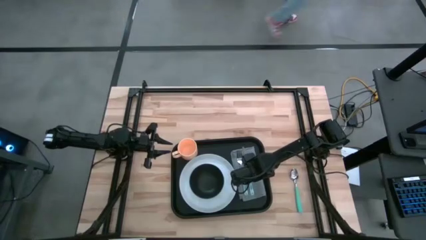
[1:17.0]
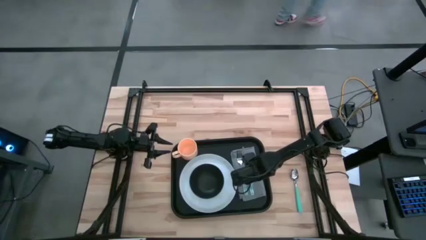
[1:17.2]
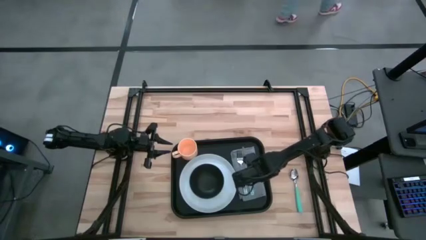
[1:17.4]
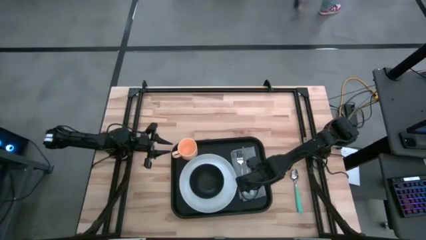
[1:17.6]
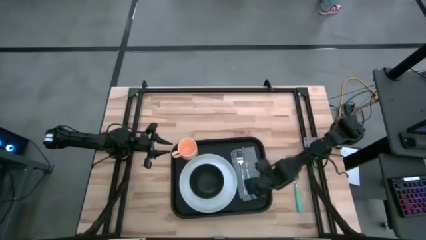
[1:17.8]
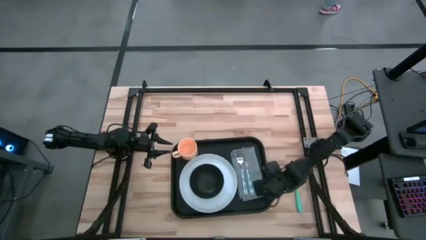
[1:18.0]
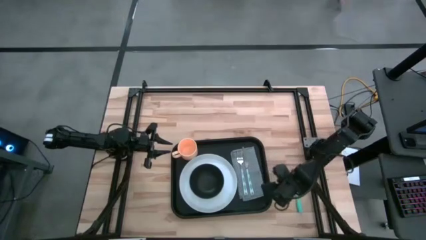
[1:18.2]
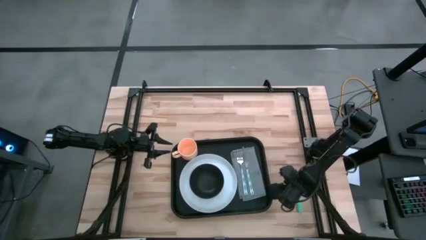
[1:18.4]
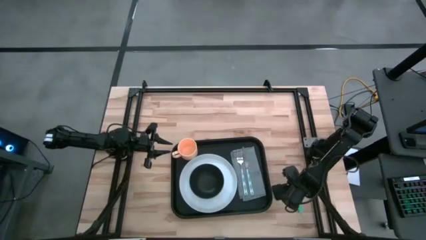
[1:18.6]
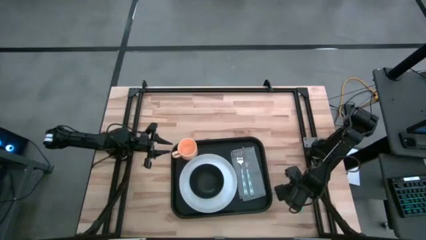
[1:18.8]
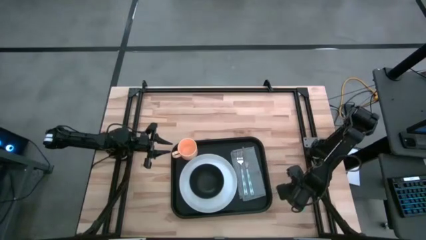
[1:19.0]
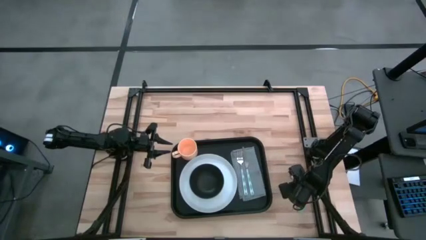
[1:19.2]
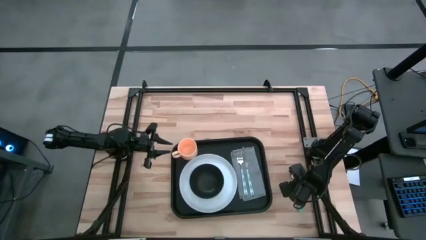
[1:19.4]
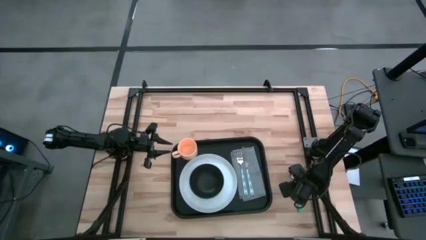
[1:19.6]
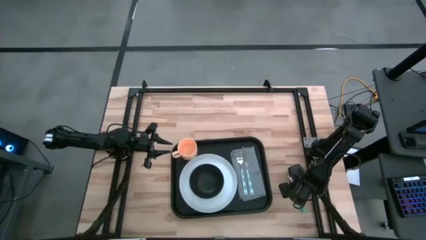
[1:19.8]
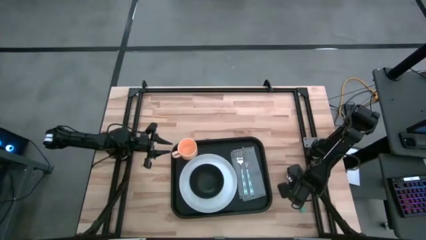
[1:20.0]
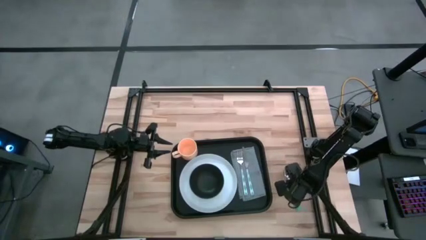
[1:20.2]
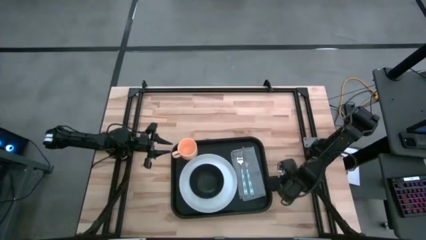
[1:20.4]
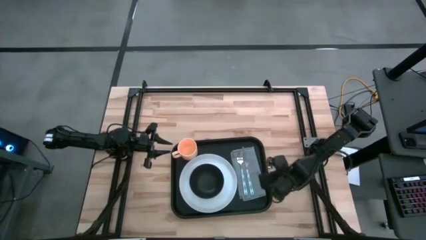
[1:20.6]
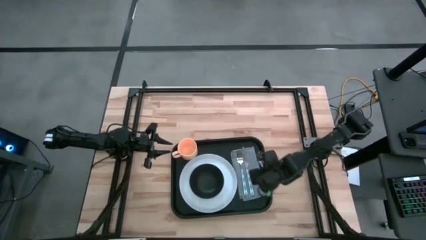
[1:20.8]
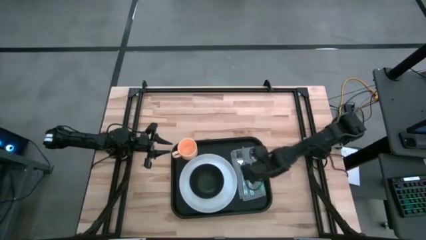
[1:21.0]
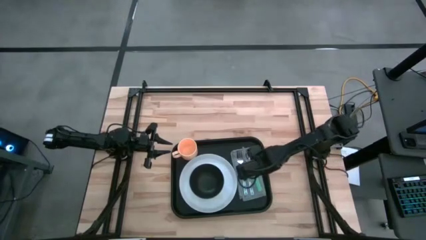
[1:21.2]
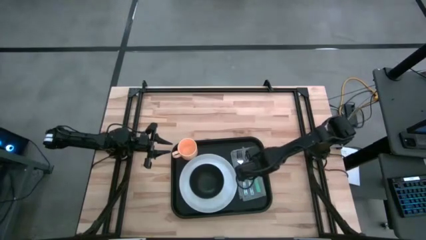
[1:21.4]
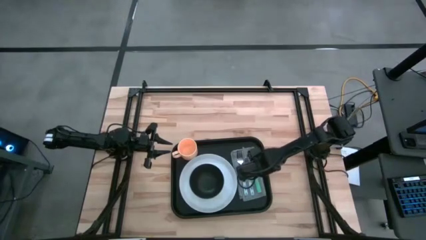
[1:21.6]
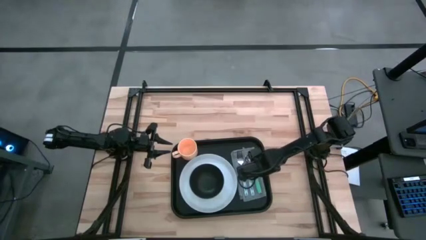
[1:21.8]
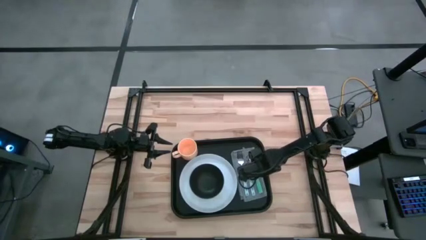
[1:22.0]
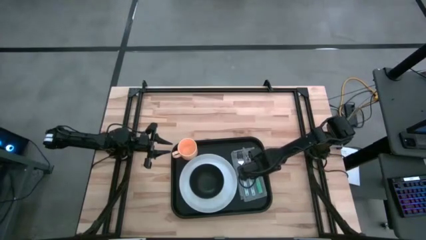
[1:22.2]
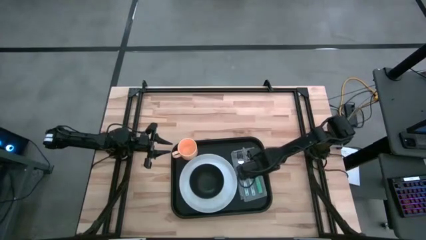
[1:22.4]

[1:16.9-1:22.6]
Task: Set up tray
Put the blue spoon on top of the gray napkin right of the blue knife

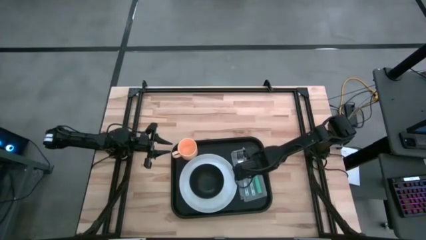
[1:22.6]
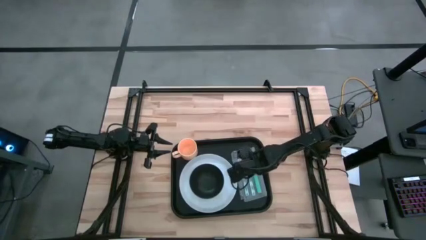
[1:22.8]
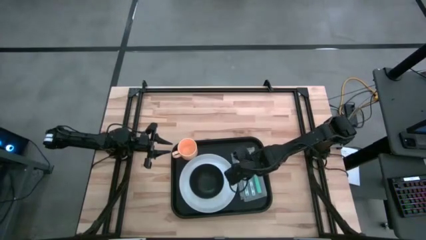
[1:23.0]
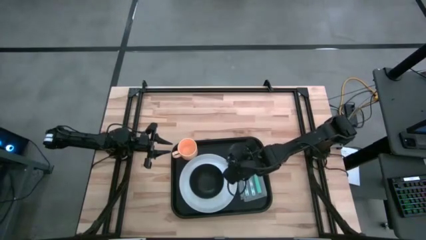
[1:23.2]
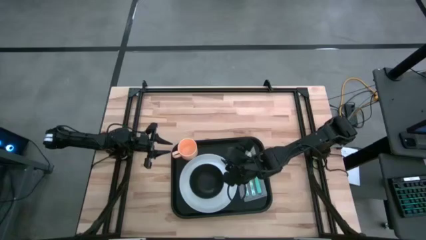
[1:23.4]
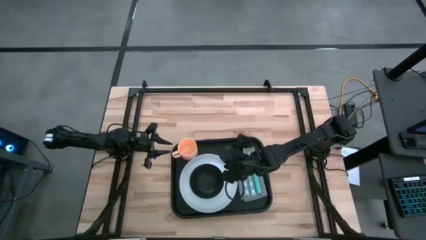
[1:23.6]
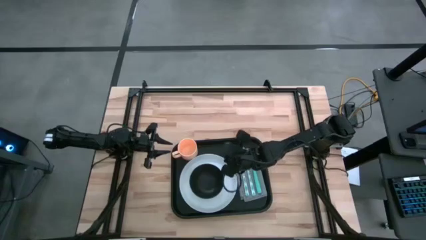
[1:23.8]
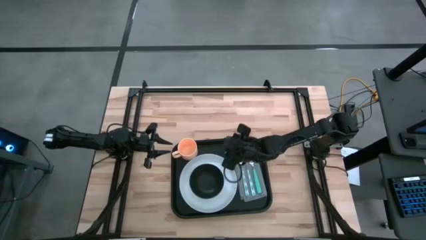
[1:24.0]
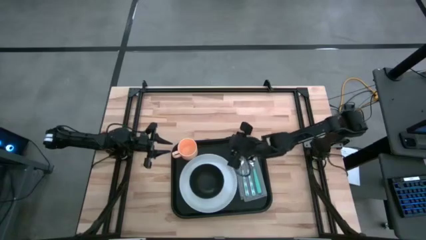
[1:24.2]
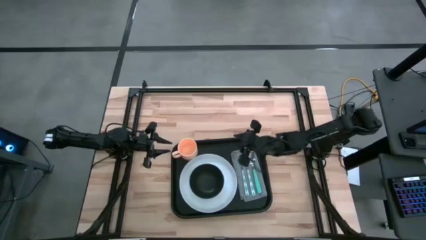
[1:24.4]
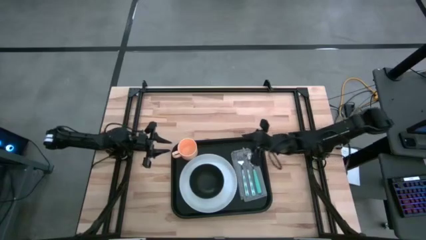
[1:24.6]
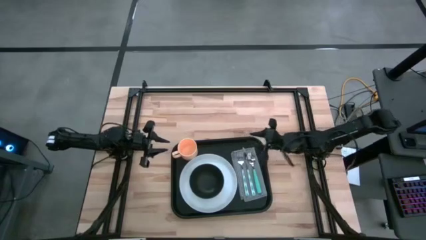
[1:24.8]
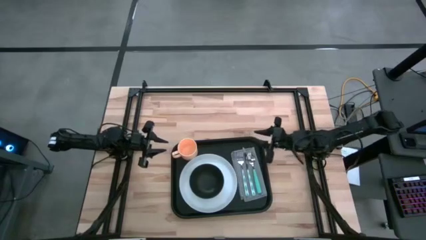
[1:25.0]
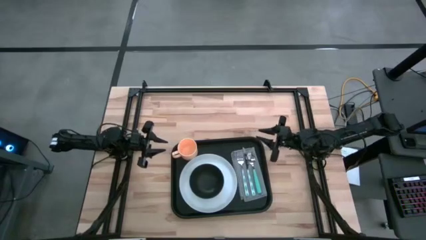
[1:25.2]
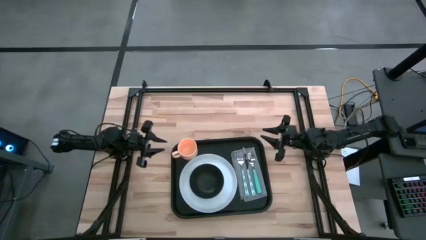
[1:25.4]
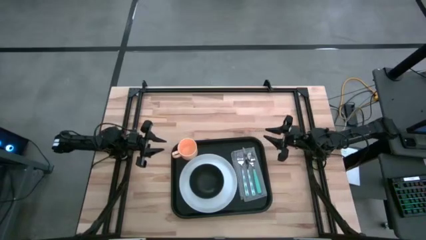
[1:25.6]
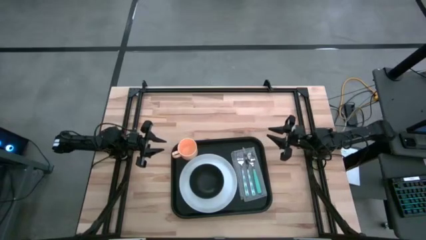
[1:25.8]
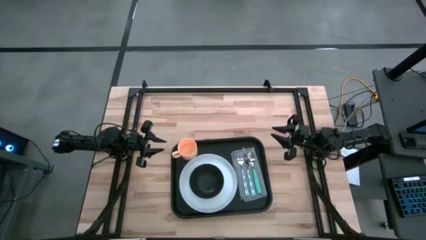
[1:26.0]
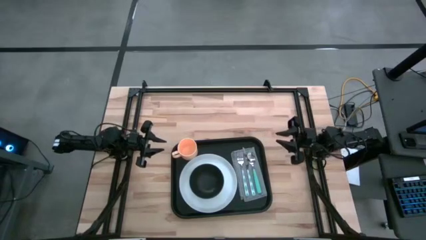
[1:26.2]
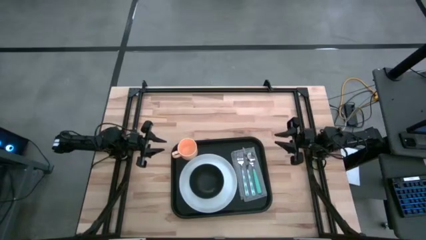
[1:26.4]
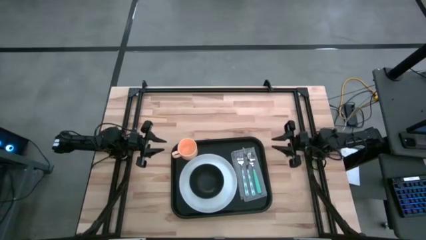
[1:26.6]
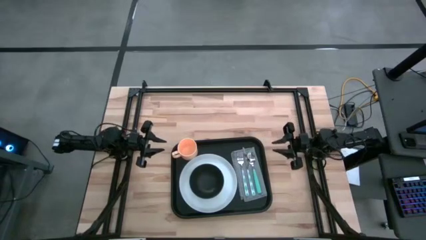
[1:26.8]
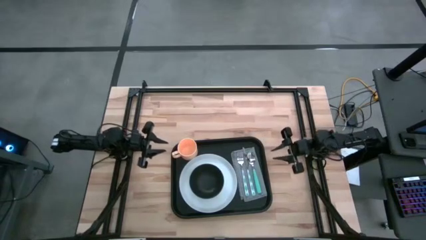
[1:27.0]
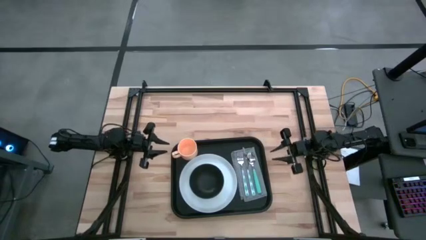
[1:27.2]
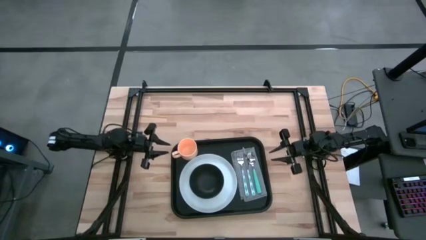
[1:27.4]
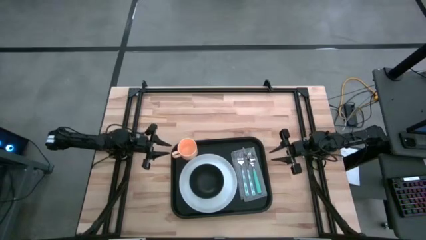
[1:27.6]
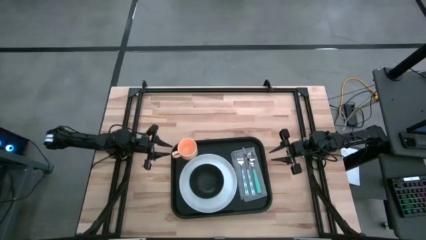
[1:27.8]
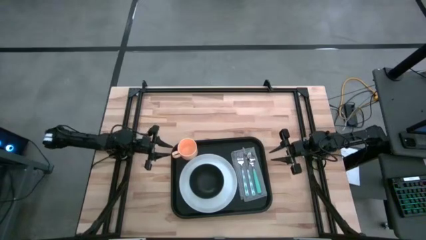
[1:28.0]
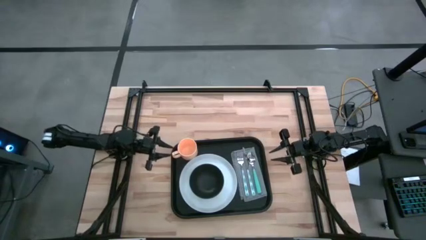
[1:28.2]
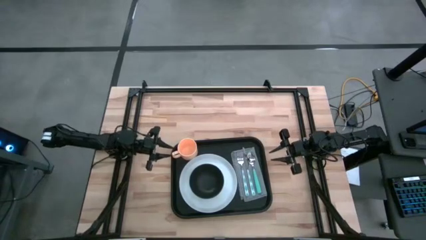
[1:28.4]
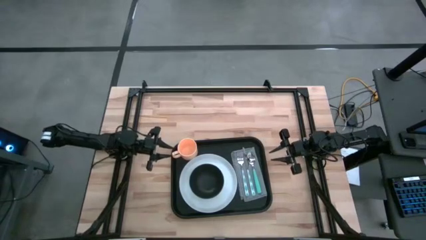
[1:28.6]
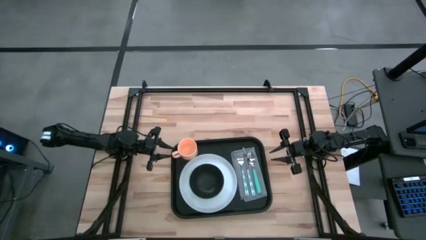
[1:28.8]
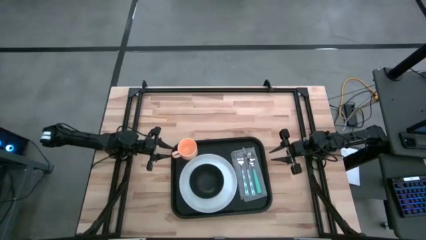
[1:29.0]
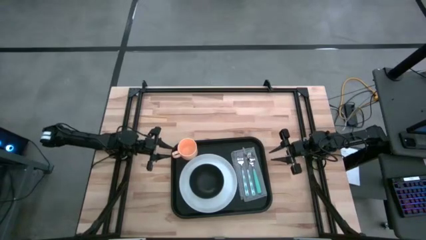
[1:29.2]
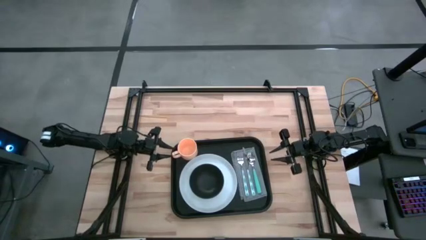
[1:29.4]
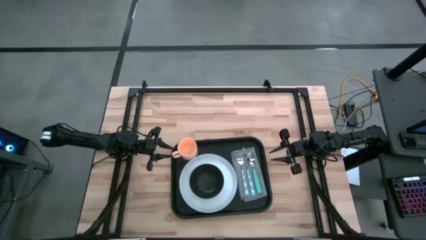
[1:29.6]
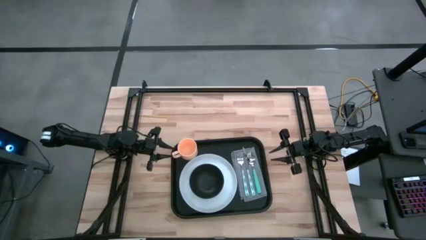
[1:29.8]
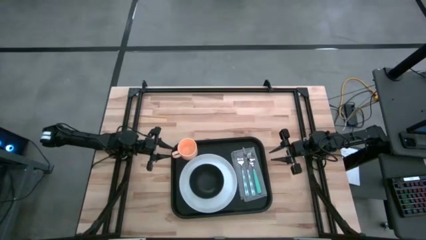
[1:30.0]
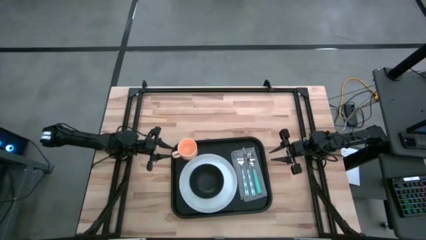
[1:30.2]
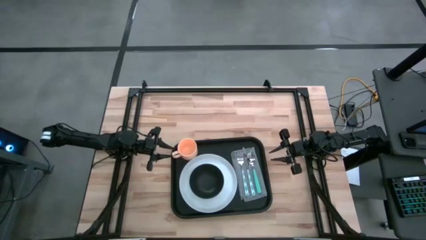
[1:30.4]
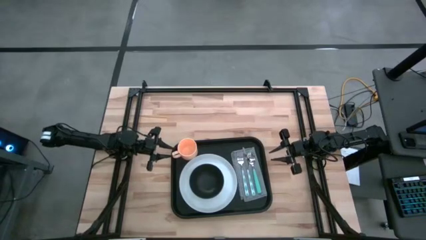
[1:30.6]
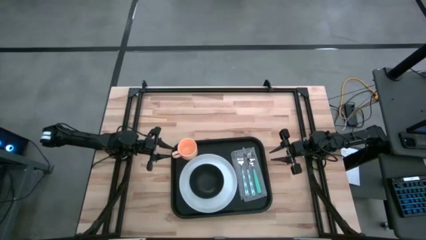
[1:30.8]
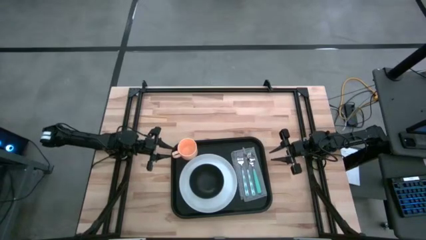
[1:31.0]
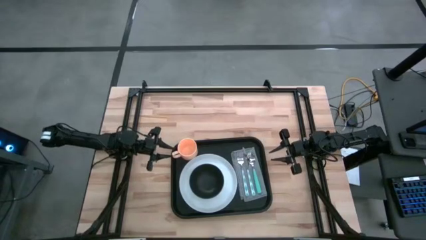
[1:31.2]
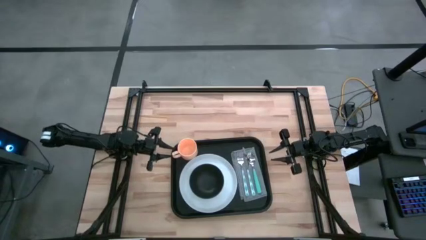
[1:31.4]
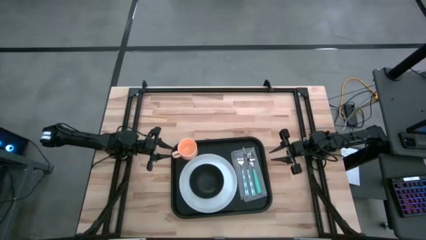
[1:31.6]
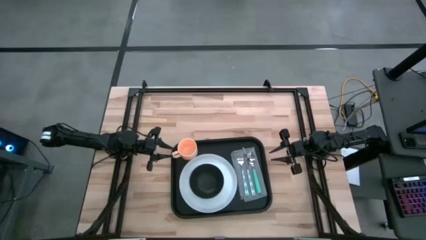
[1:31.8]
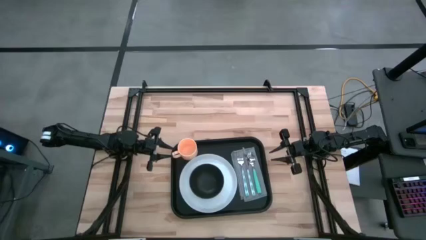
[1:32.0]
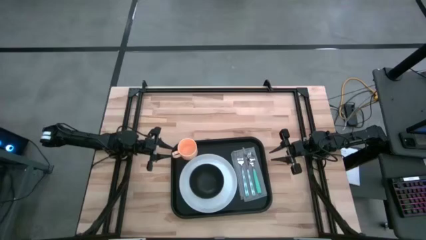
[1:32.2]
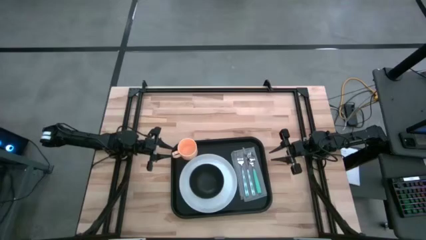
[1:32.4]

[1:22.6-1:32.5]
Return to Home Position

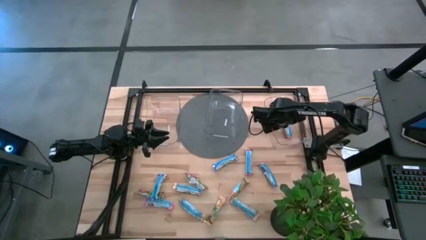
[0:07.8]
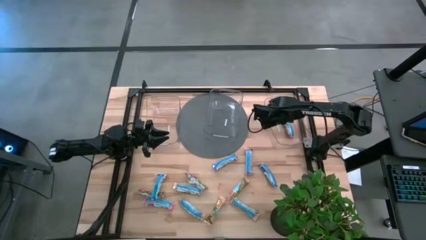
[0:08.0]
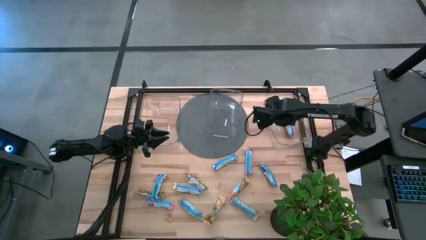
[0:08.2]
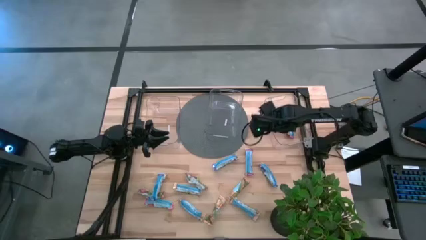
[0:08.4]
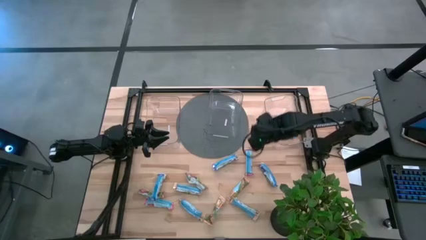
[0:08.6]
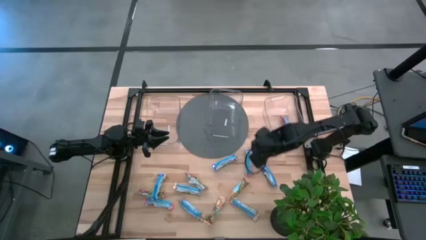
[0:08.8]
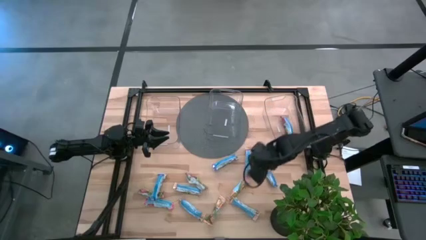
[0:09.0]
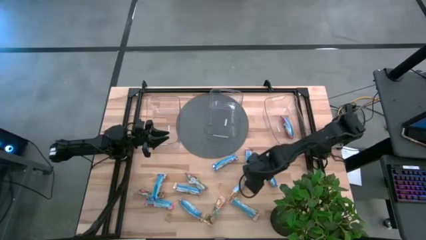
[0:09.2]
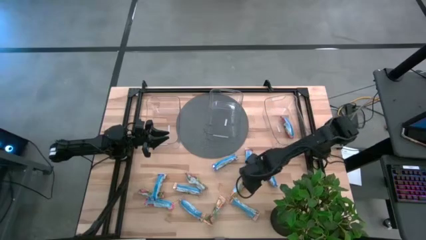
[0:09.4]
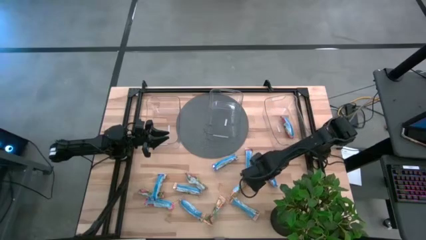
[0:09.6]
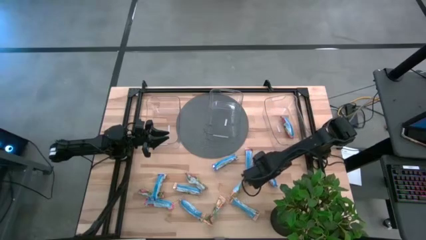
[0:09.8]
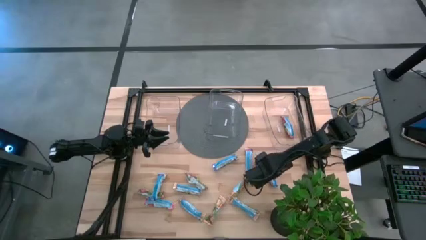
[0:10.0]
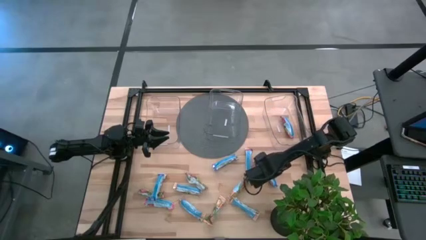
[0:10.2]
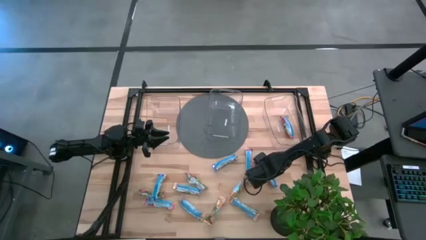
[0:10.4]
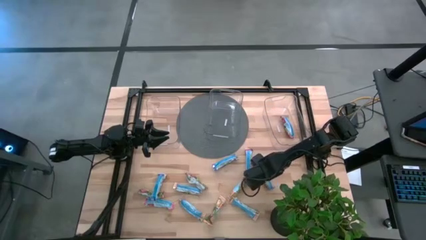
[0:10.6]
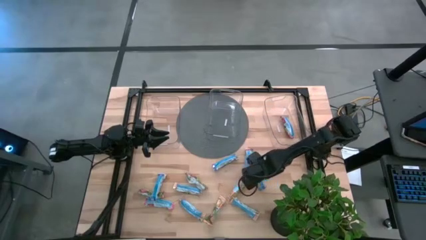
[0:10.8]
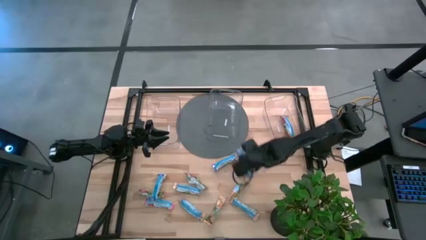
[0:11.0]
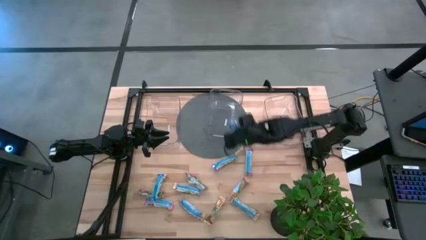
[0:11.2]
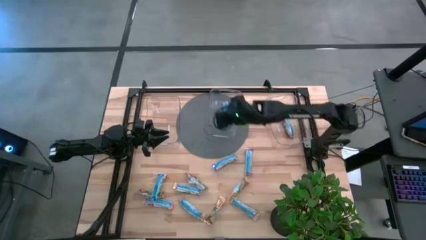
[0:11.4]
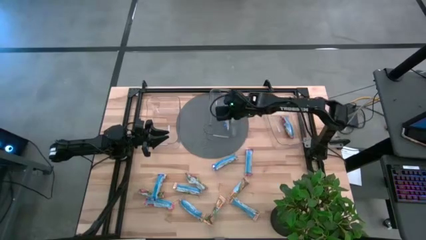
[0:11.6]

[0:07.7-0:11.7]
Task: Pick and place Granola Bars by type
Put the blue granola bar into the middle transparent bin
